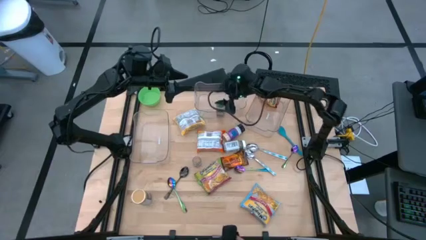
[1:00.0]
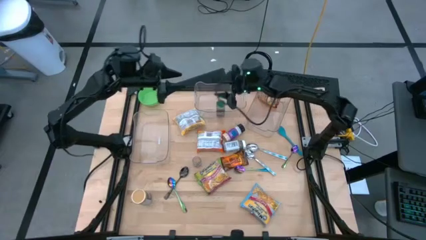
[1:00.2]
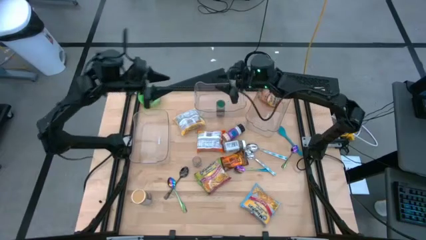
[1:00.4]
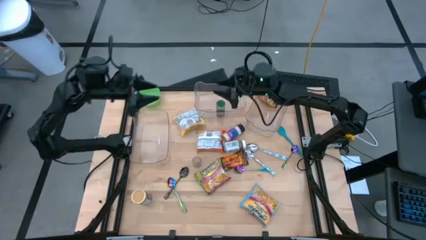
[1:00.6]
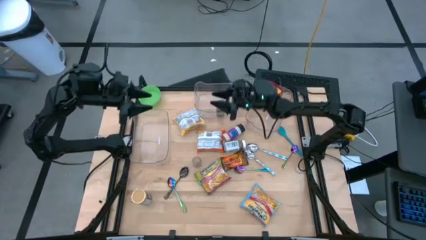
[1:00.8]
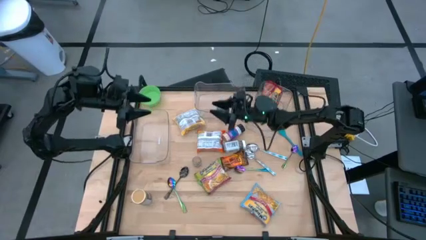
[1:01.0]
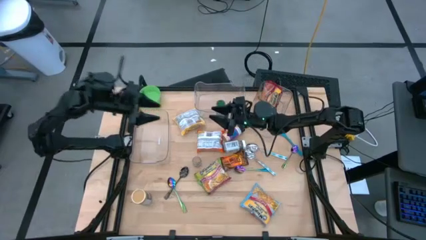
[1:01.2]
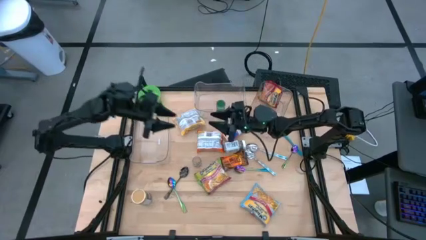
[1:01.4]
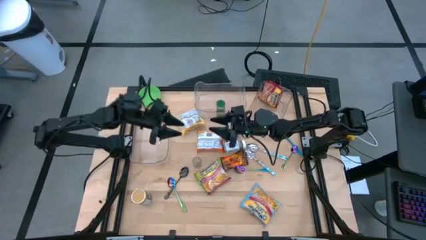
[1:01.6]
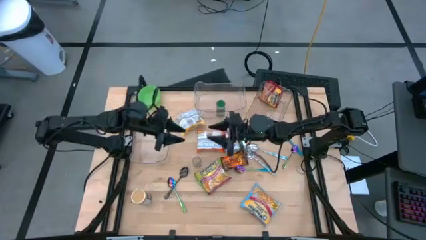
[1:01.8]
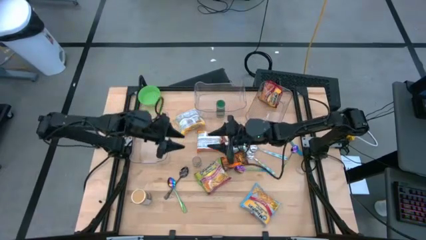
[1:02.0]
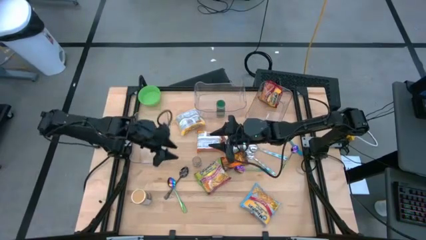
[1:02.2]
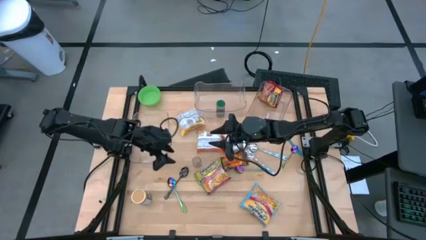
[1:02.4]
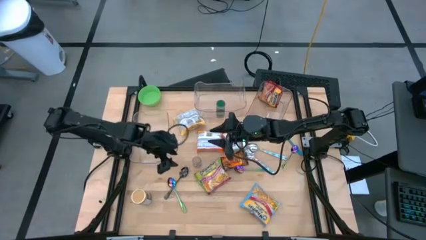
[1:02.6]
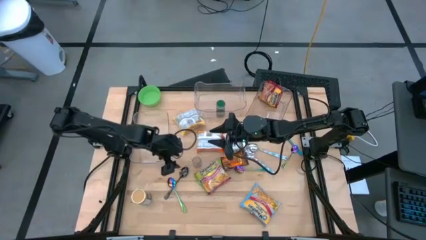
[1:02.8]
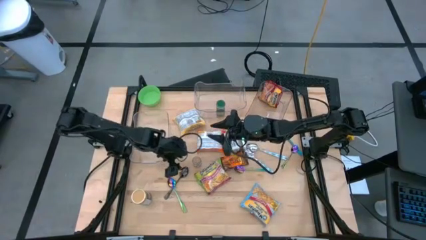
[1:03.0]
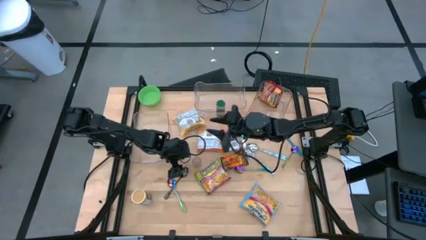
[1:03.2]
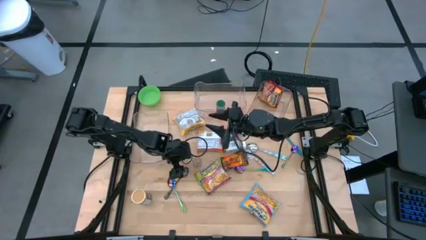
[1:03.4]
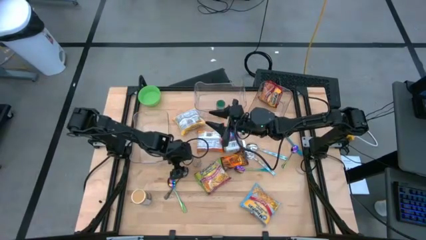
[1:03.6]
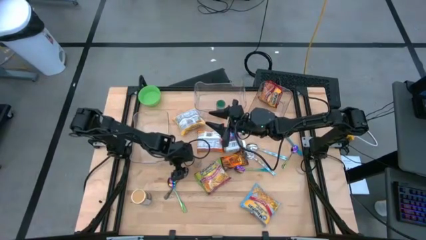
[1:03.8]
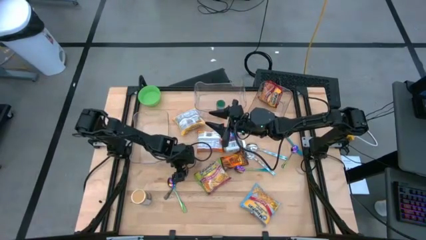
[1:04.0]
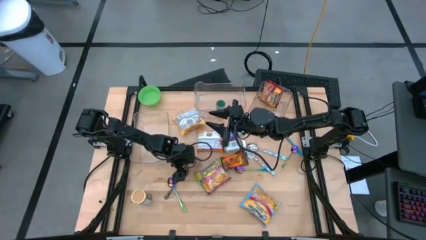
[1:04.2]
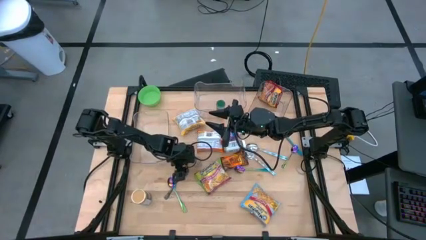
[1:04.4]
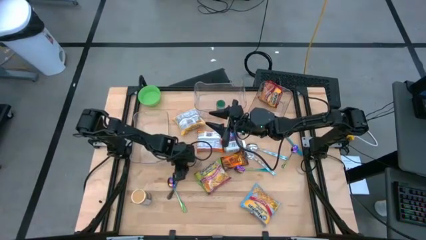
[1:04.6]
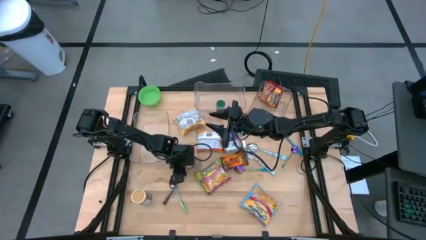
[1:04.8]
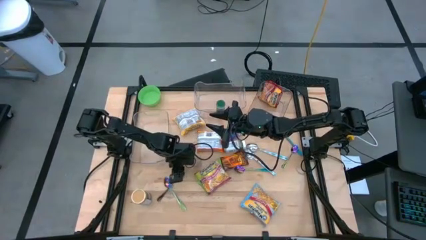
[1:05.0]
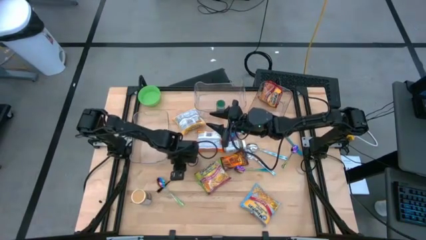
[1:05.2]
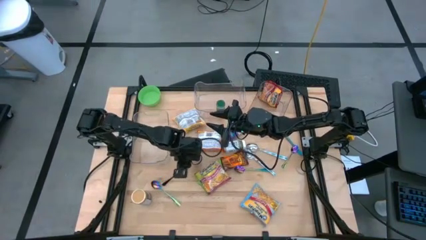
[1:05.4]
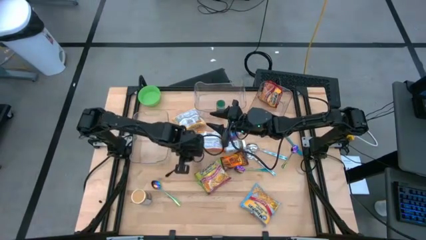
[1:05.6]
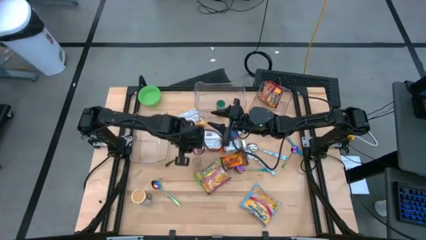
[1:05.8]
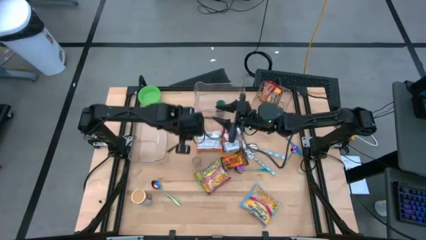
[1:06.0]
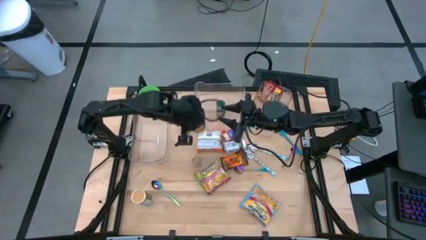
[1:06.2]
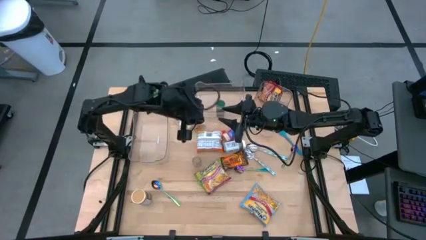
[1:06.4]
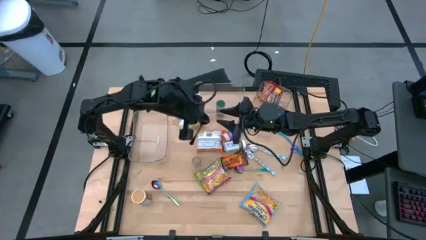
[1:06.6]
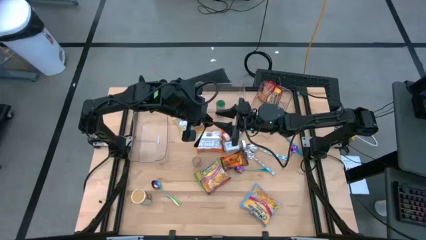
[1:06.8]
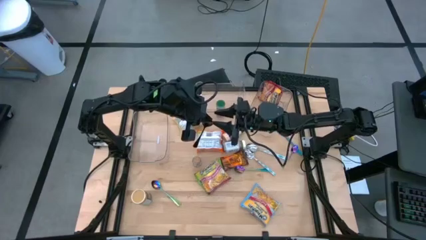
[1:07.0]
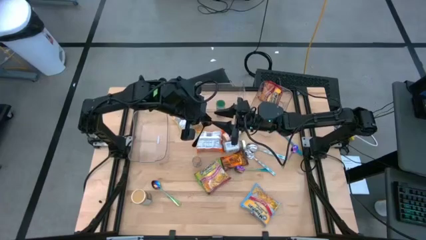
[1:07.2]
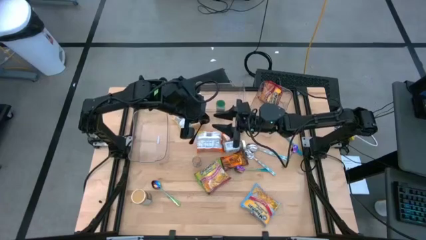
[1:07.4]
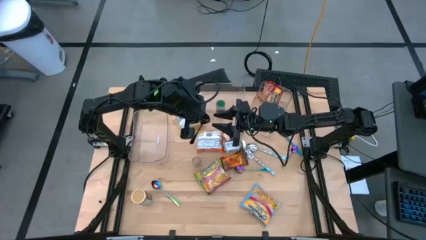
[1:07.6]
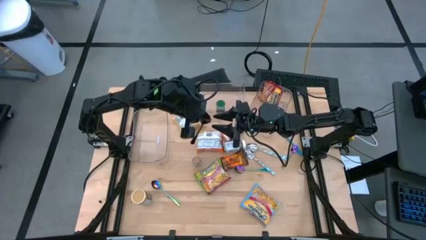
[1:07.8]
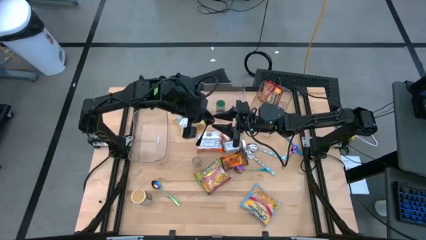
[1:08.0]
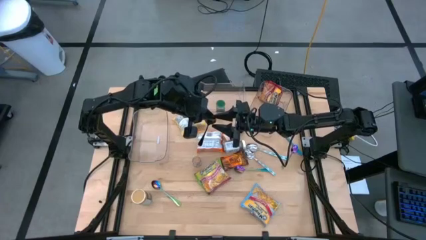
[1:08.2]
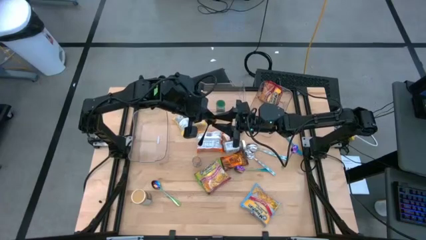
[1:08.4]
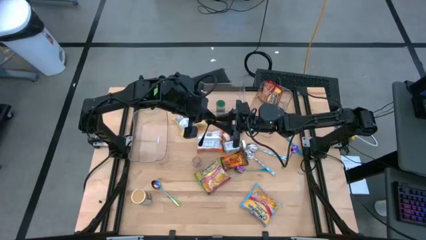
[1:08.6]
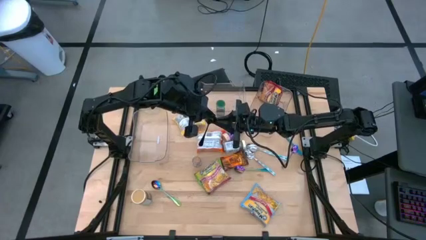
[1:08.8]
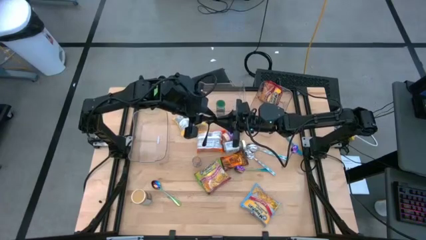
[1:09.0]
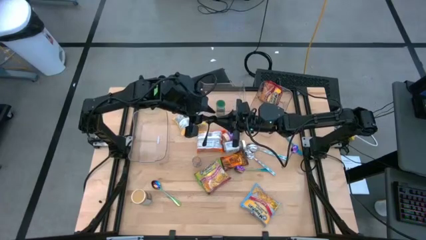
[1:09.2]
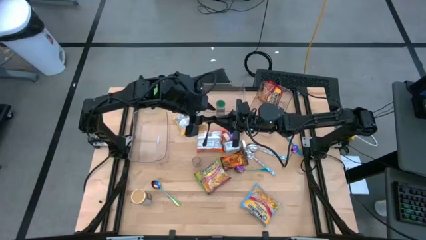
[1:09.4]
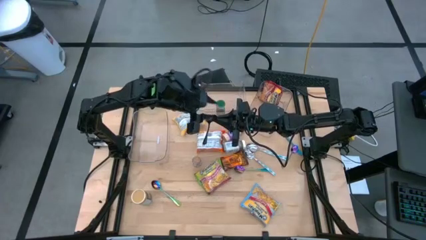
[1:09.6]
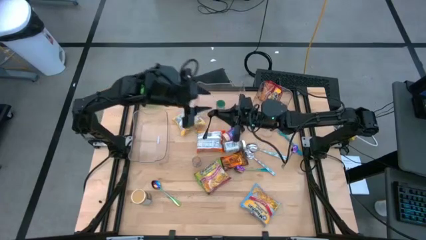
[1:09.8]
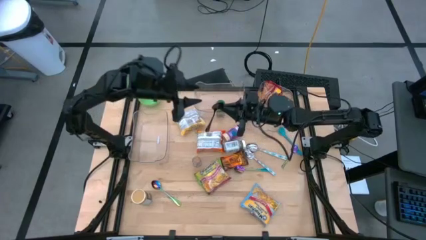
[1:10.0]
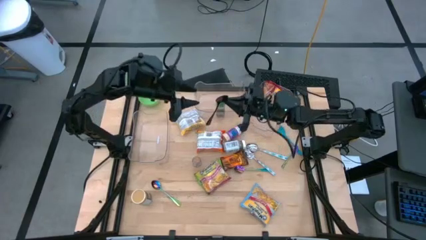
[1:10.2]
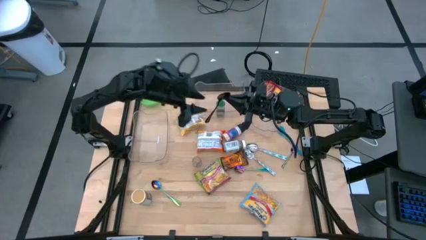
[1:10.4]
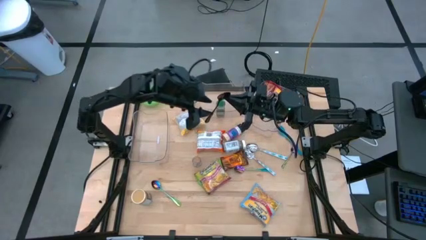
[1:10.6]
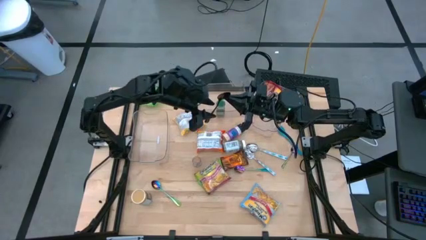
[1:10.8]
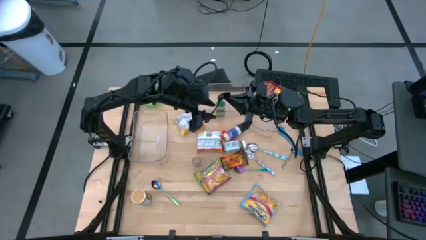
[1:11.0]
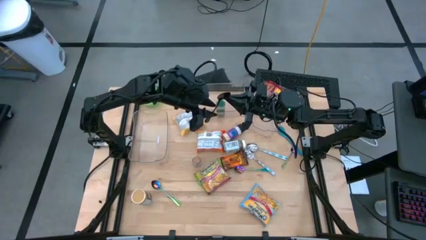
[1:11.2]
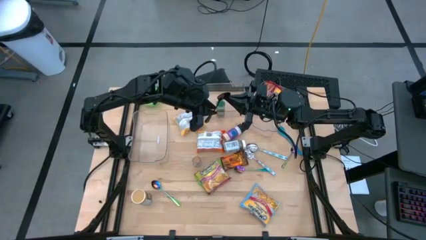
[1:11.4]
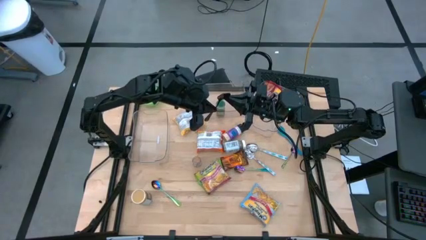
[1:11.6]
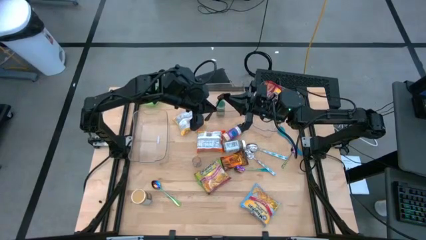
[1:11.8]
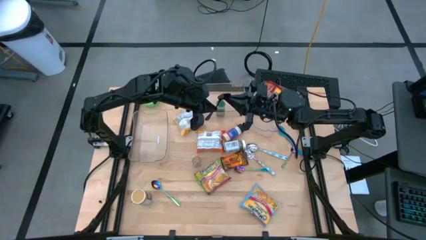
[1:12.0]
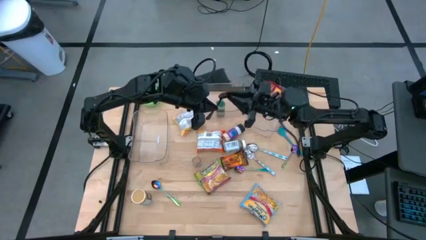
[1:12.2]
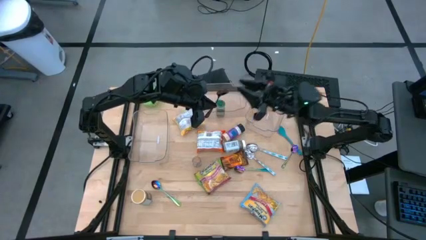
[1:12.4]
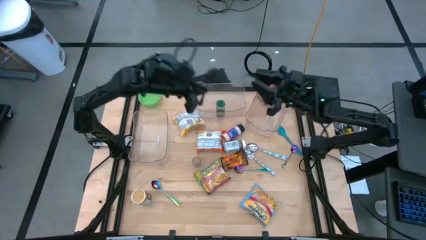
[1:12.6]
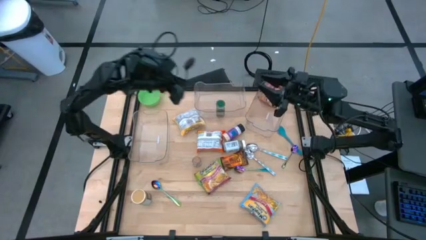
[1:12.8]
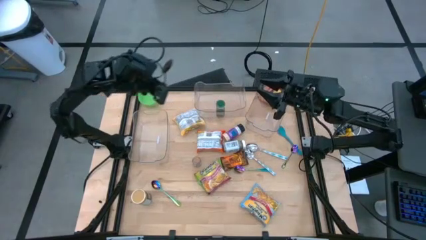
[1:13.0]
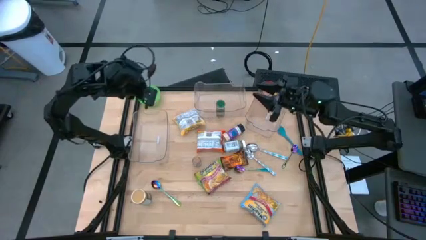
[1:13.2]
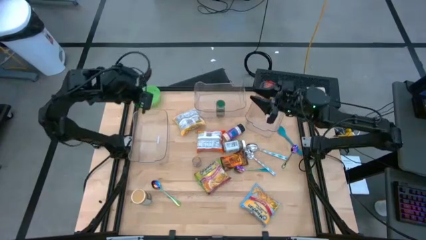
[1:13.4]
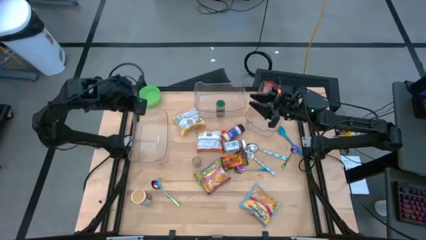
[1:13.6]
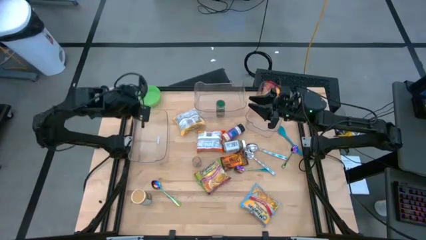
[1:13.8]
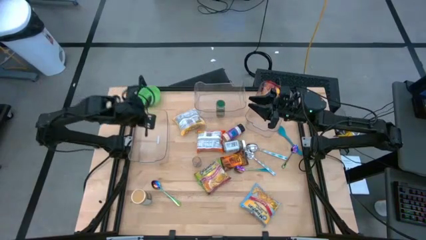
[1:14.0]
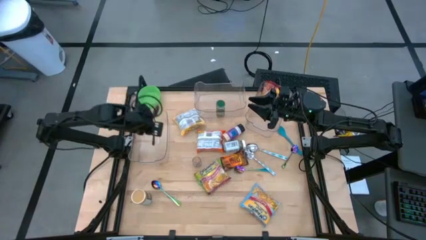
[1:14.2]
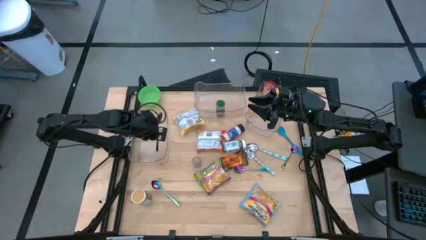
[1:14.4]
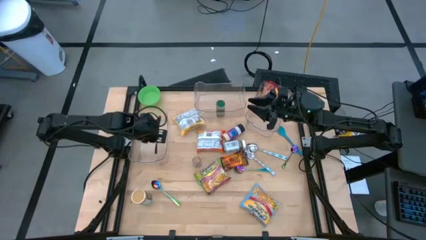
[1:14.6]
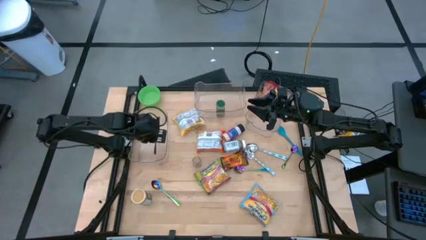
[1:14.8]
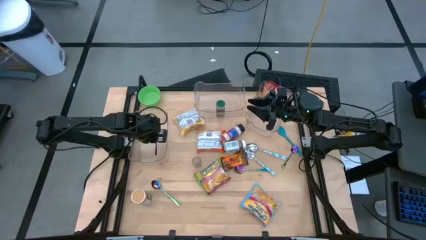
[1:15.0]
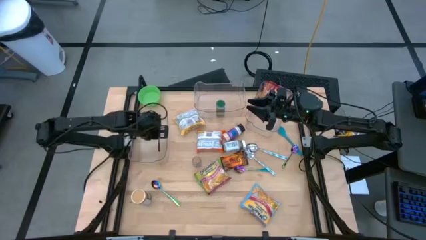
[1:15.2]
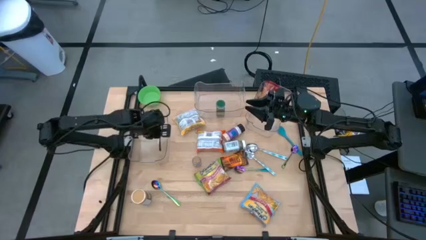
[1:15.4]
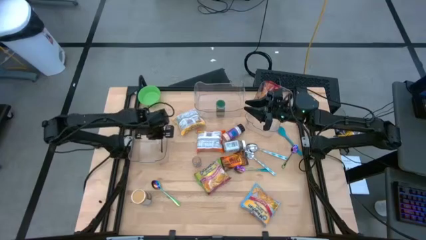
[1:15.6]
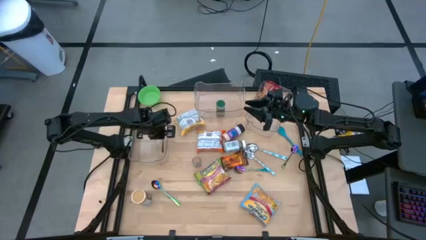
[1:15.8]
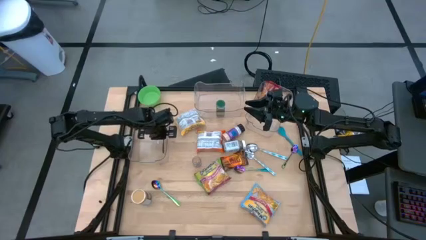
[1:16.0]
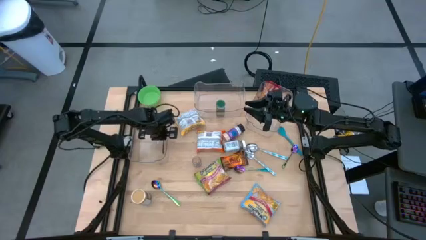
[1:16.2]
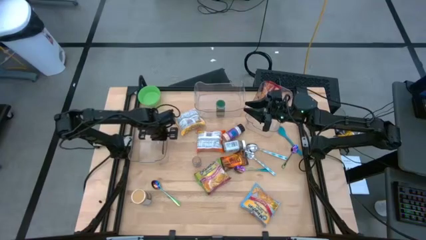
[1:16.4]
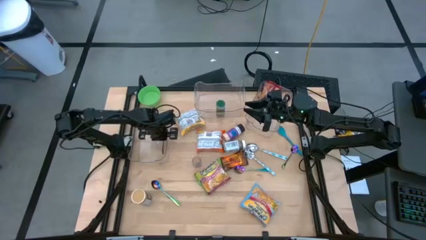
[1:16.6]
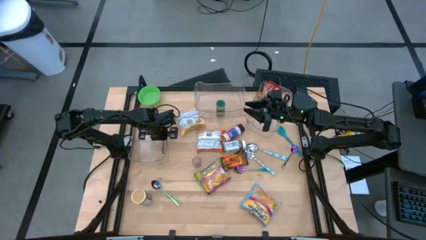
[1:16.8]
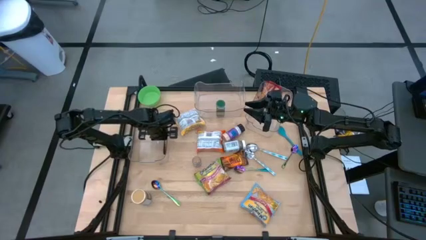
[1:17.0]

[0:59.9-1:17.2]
Task: Pick & Place Food Item
Put the black spoon into the left transparent bin
